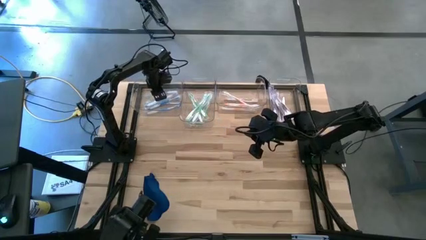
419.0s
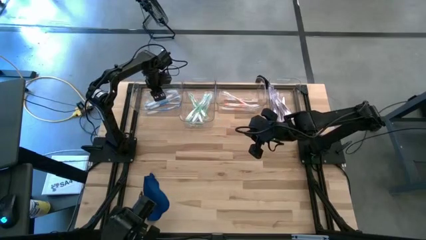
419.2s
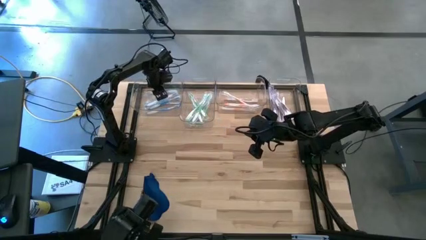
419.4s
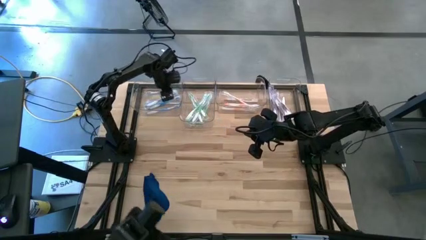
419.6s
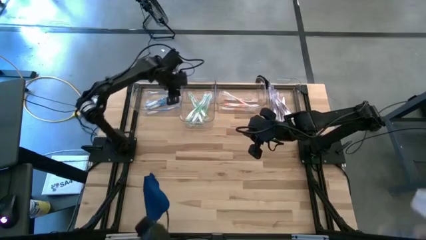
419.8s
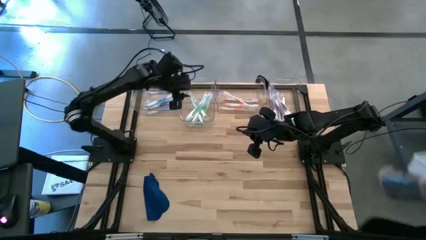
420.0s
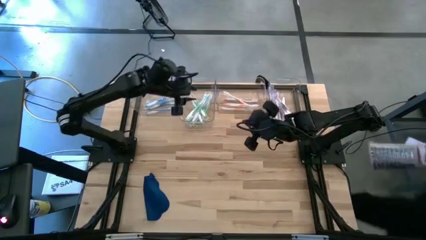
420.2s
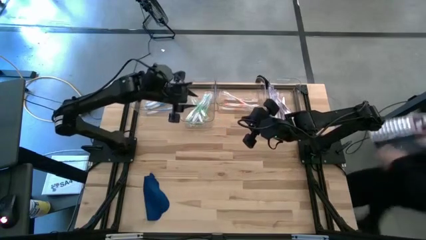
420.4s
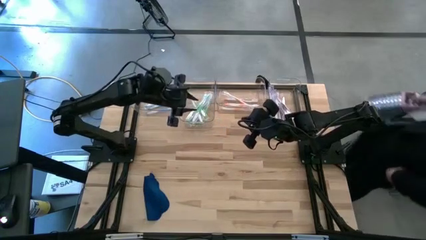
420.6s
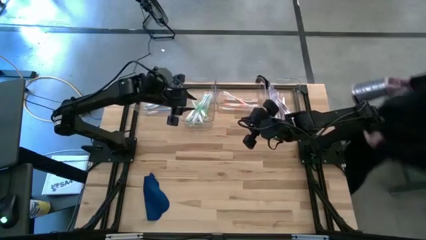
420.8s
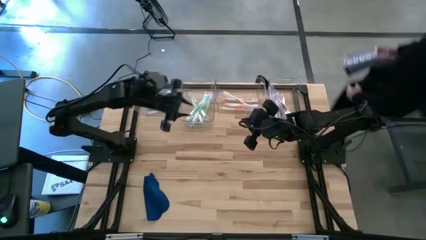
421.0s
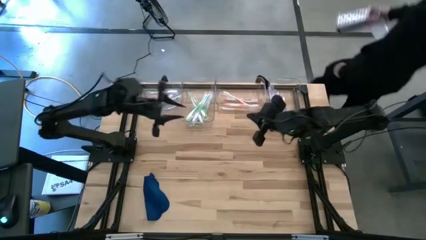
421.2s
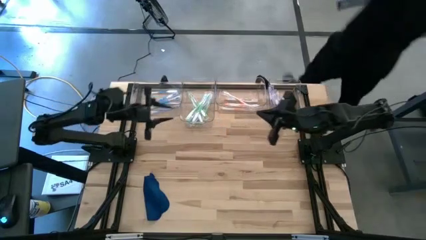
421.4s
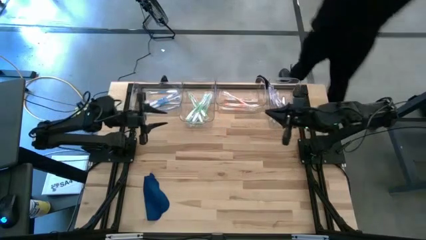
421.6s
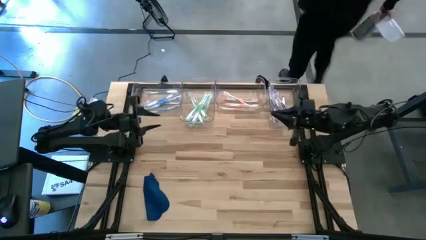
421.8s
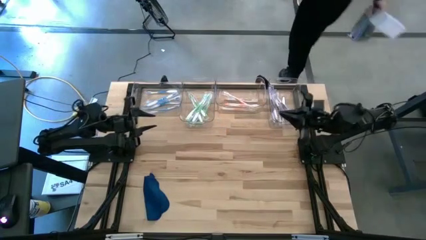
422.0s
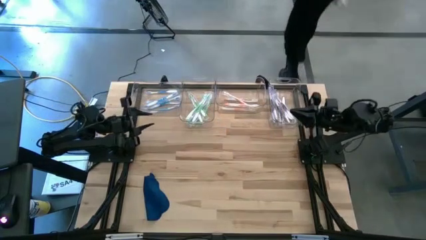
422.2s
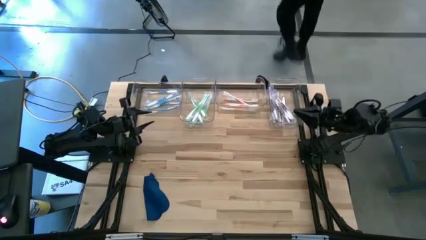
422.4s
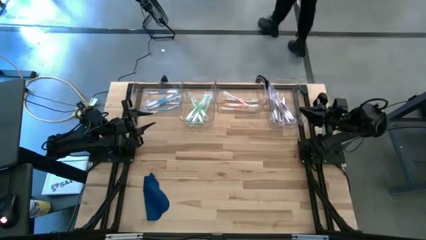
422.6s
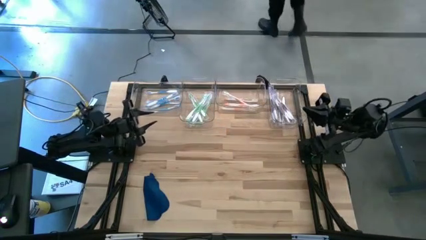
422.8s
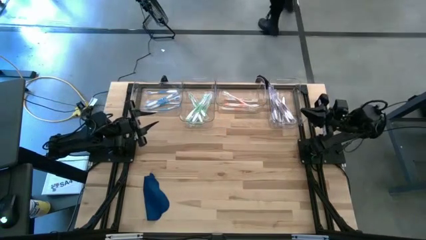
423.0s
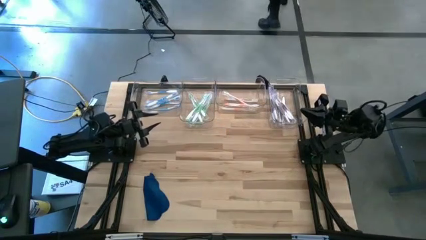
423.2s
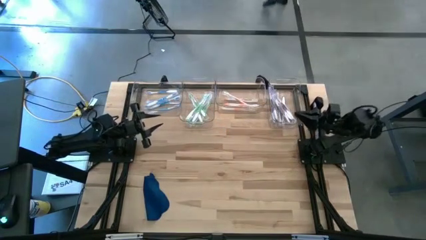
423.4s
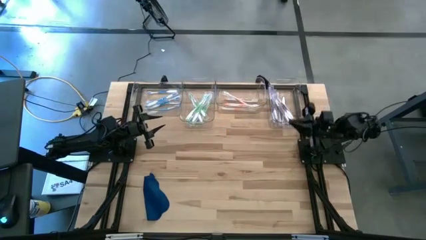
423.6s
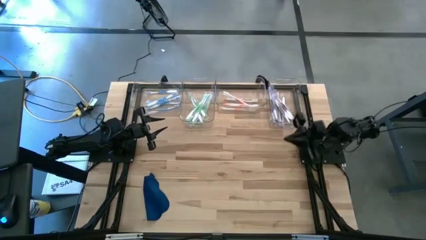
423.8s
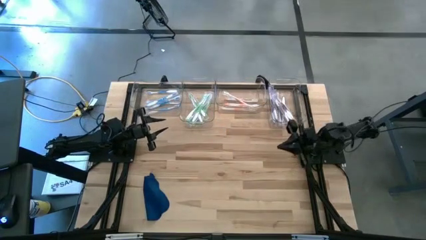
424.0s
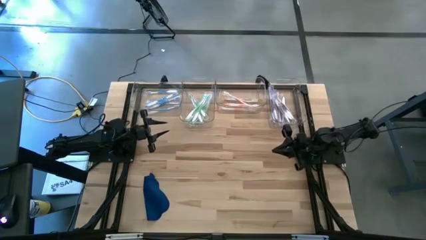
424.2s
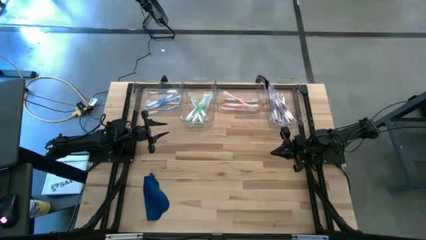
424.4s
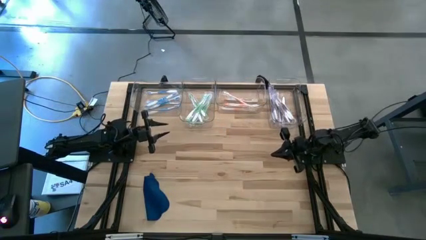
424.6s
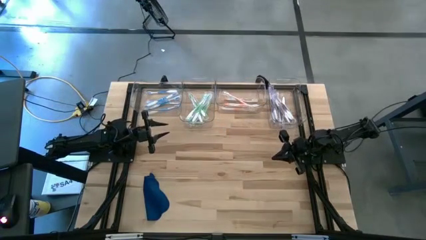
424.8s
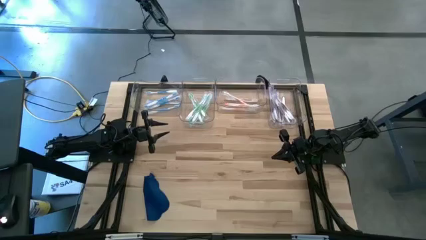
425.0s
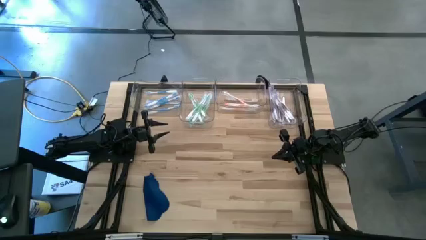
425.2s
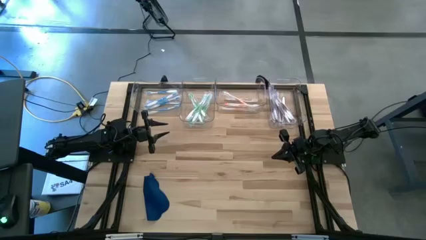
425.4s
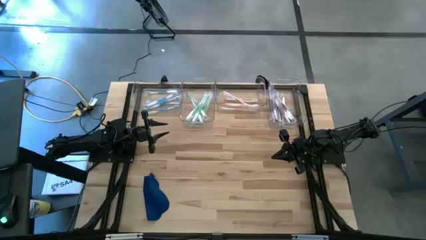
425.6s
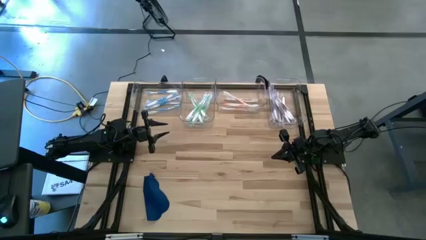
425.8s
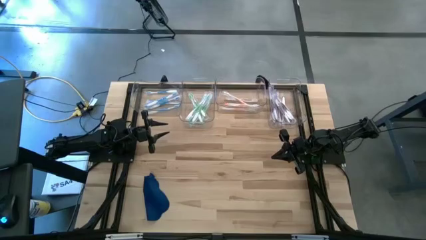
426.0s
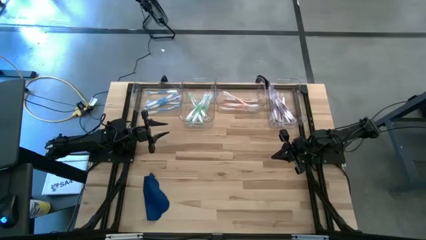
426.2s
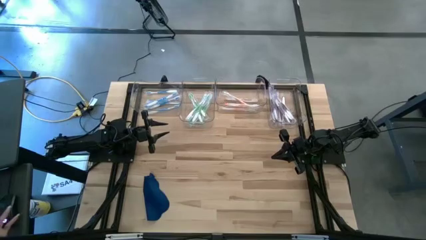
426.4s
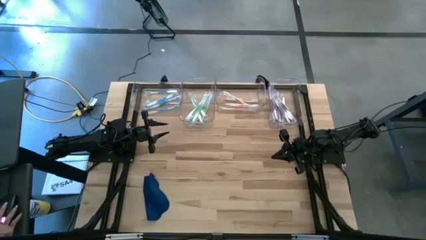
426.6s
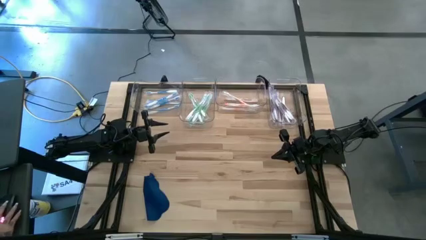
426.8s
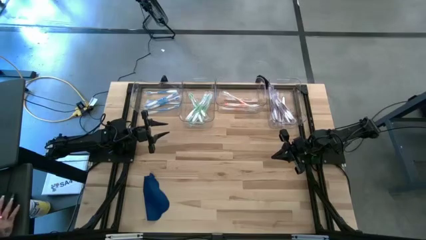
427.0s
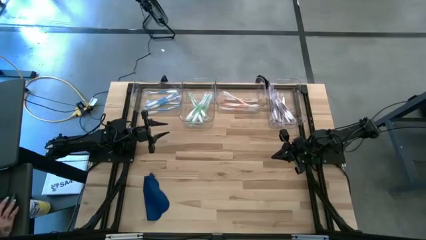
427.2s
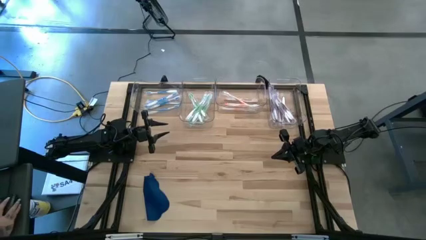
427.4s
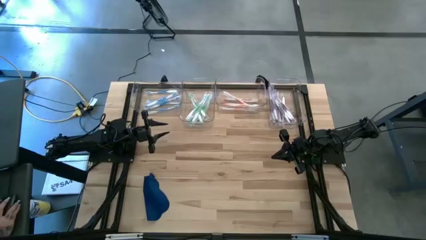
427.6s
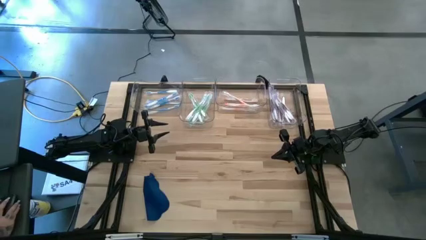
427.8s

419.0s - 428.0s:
Task: Pick & Place Toothbrushes
Return to Home Position

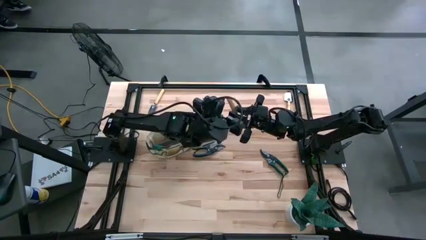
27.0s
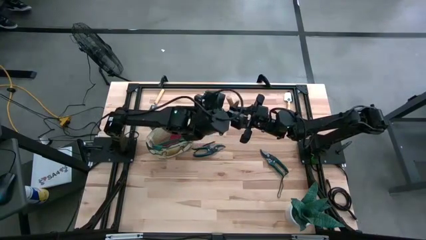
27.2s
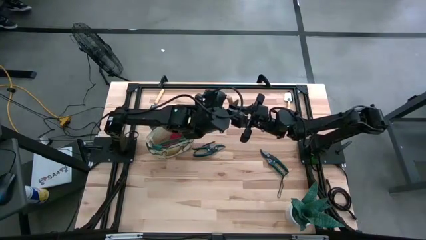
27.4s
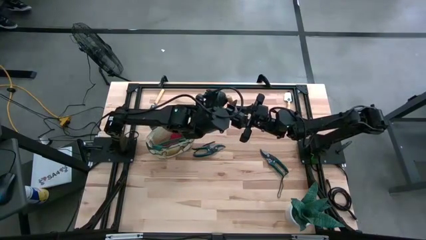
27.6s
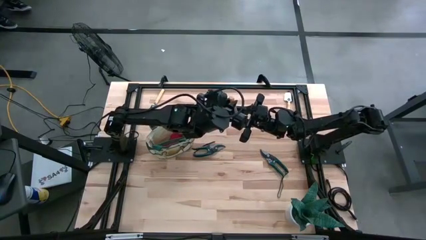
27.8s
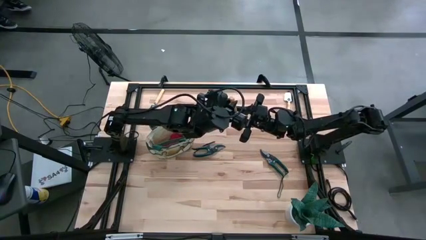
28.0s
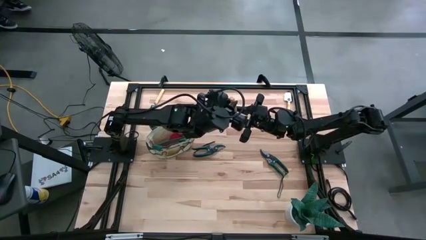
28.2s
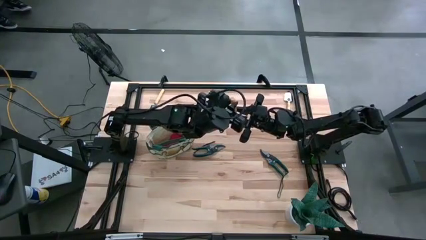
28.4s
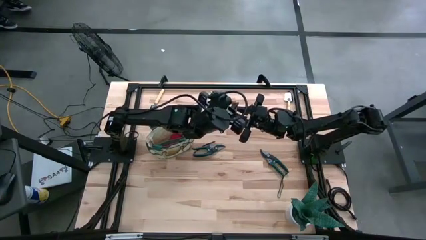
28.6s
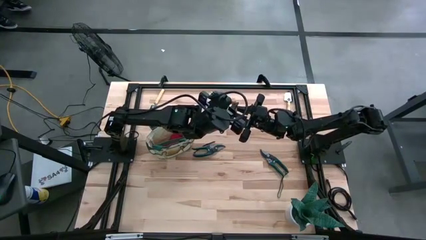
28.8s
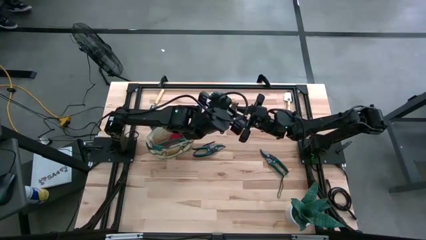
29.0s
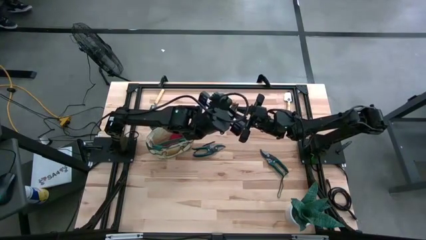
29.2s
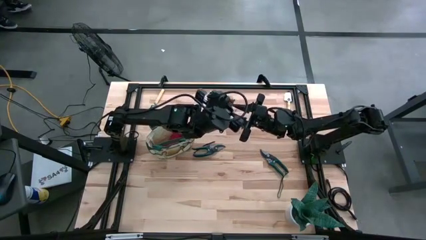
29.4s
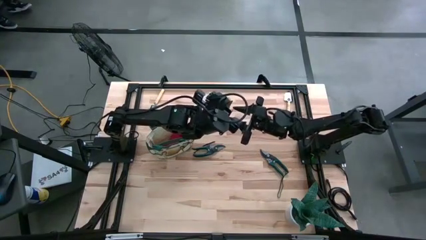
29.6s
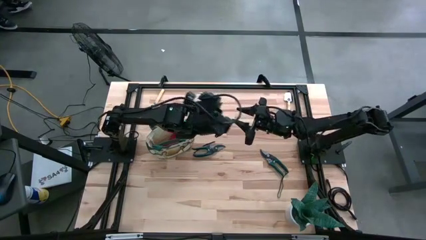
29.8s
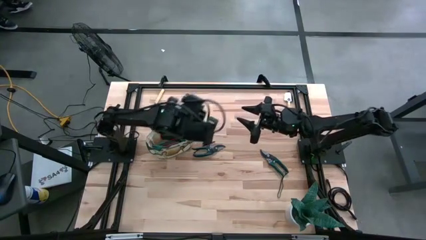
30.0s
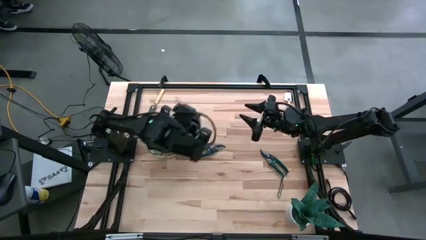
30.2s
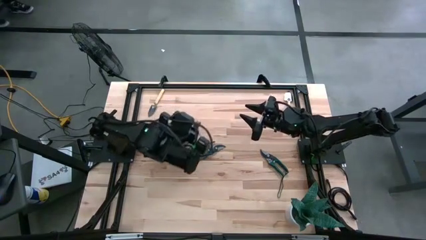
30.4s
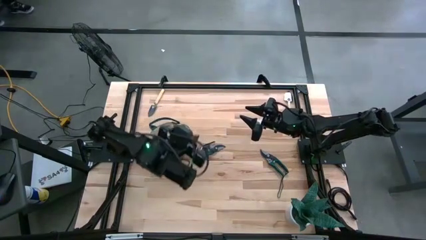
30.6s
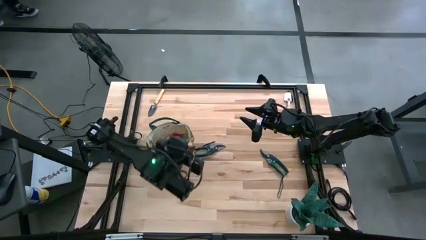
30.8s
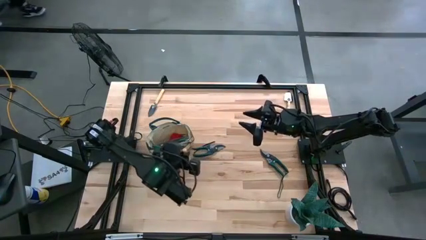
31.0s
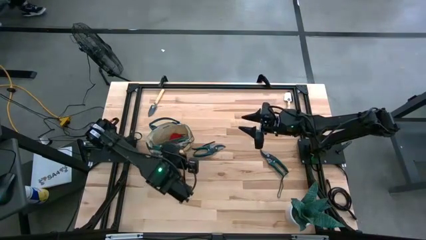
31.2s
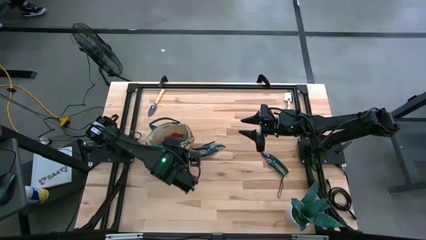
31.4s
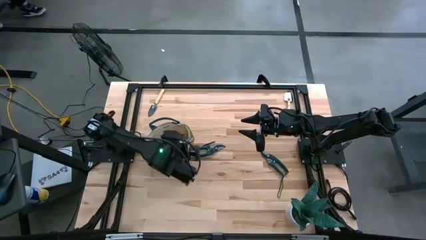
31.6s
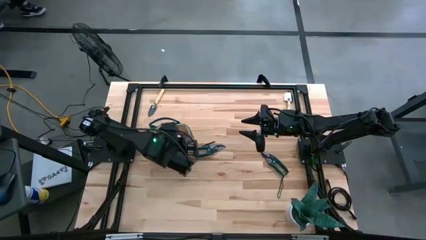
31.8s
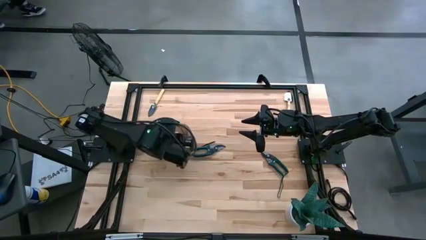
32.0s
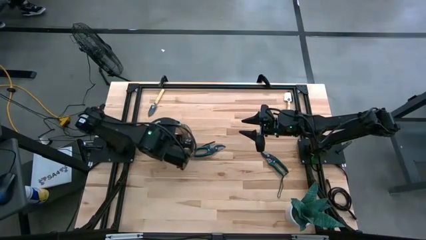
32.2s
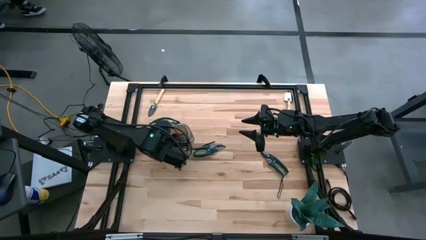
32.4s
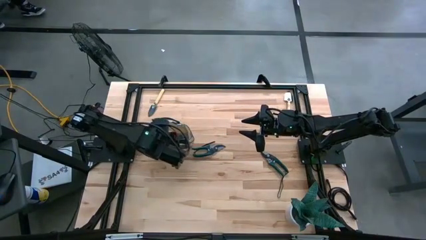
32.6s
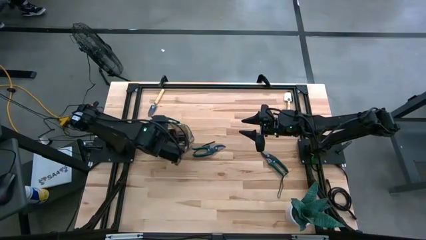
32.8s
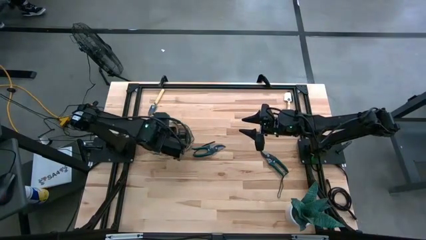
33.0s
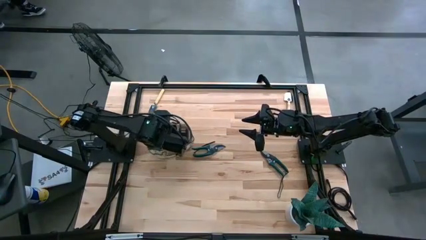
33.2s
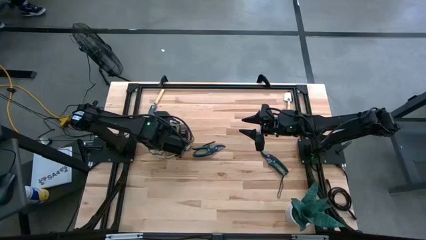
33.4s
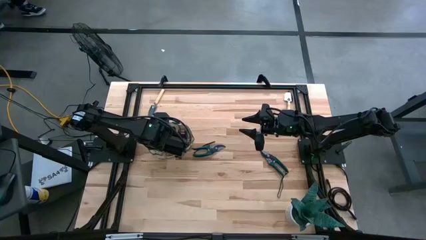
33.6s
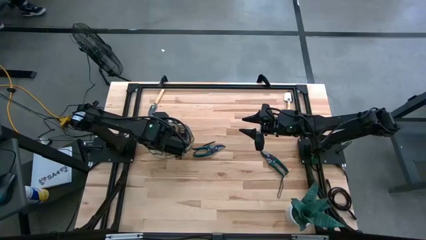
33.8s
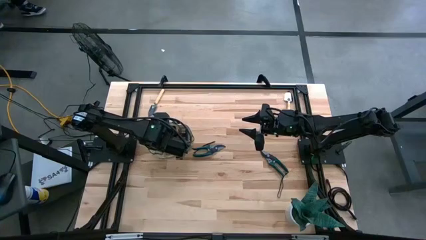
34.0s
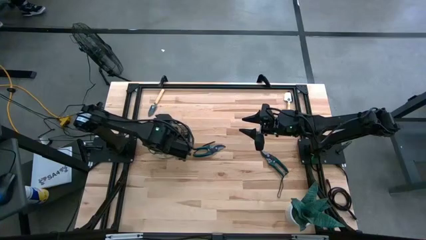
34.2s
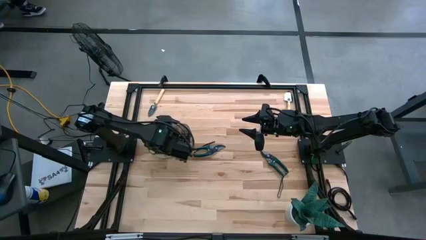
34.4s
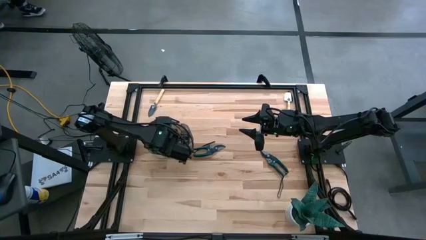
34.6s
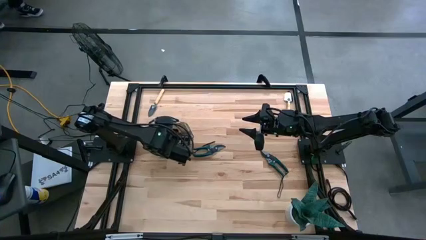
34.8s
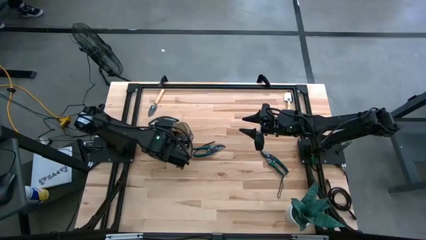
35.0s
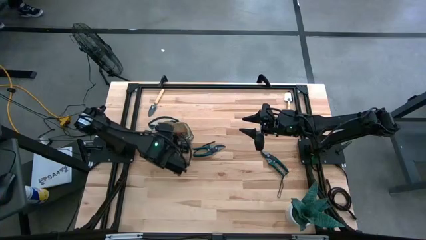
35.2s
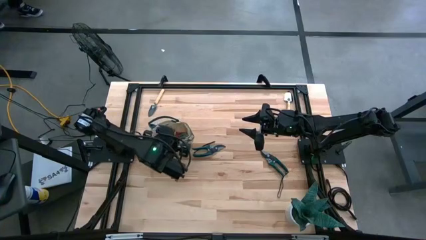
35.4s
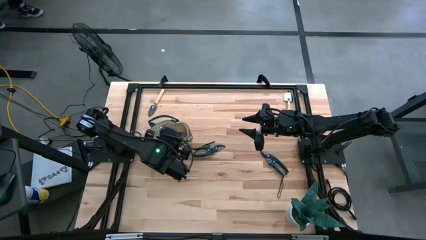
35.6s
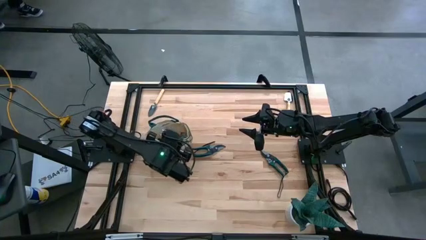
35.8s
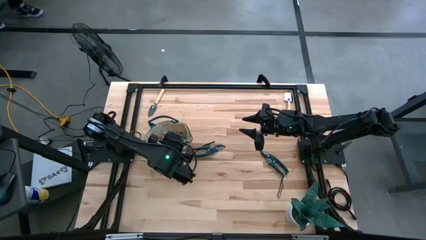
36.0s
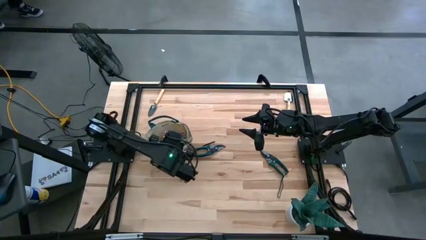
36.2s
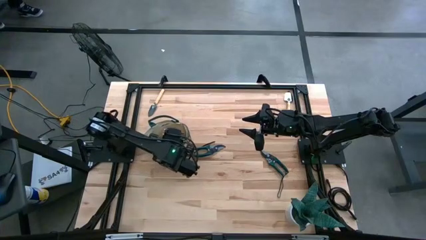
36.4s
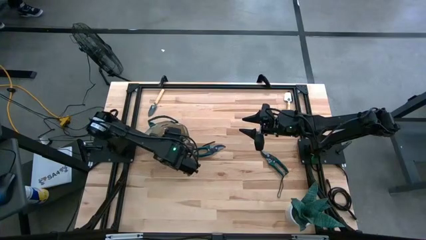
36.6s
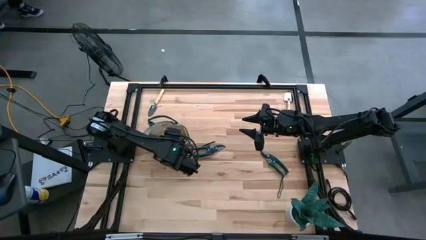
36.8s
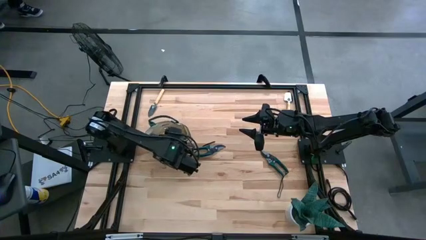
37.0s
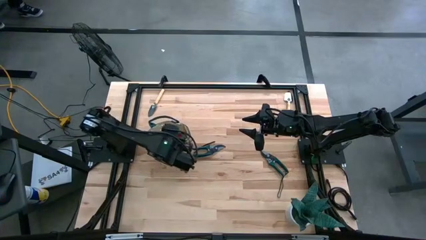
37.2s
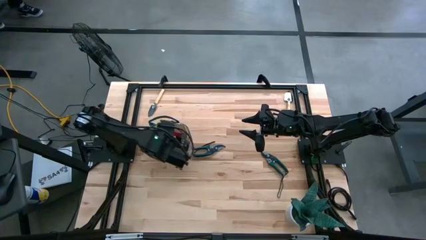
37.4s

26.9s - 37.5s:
Task: Pick & Place Garden tools in Gardening bag
Put the light brown hand rake into the white gardening bag
